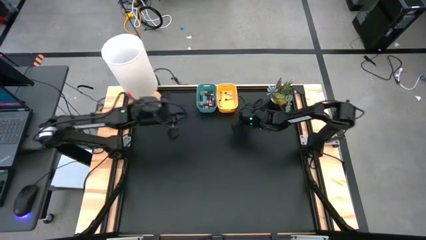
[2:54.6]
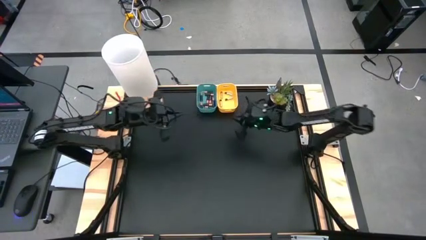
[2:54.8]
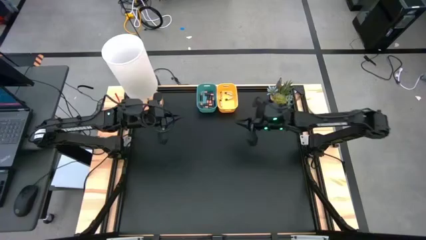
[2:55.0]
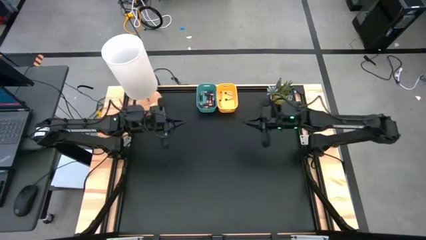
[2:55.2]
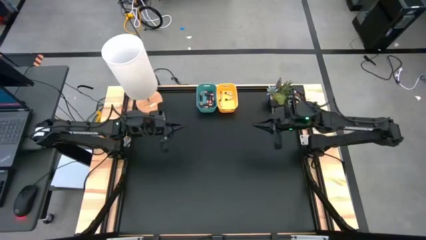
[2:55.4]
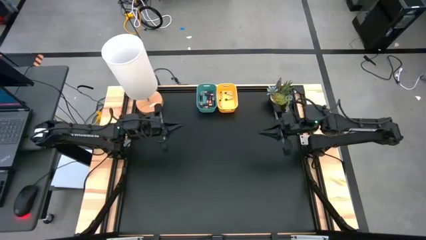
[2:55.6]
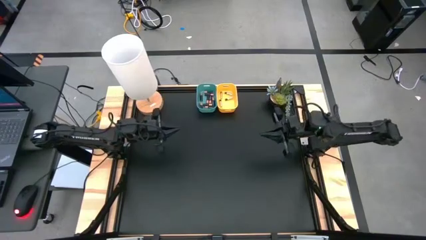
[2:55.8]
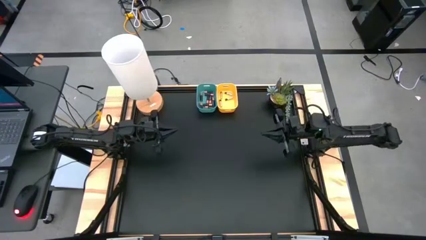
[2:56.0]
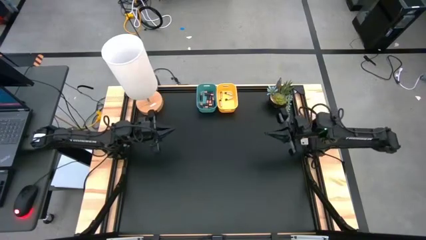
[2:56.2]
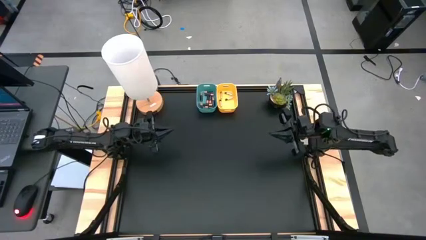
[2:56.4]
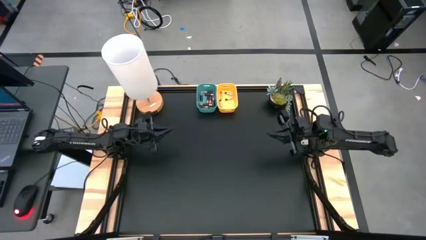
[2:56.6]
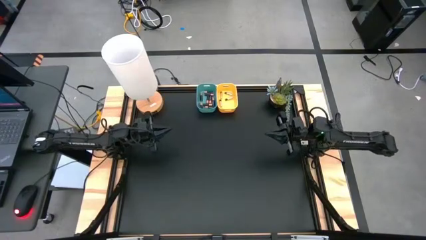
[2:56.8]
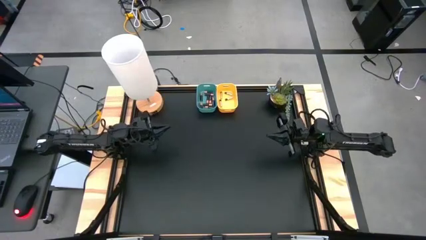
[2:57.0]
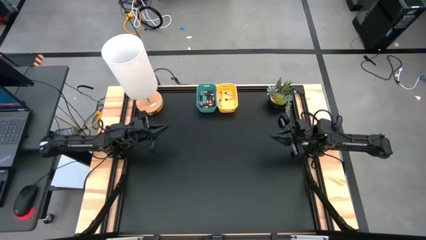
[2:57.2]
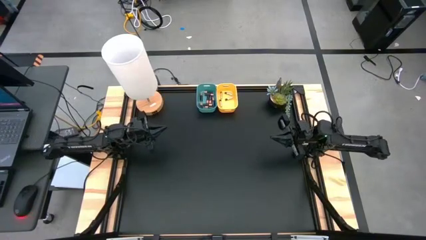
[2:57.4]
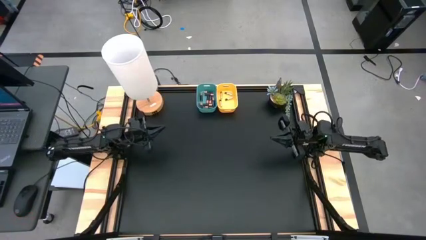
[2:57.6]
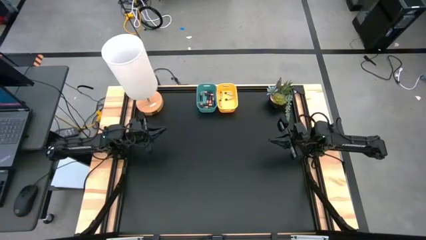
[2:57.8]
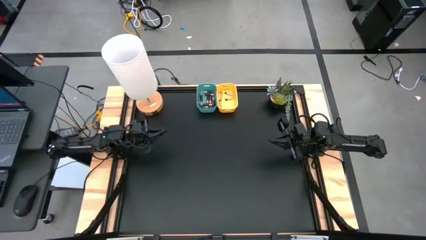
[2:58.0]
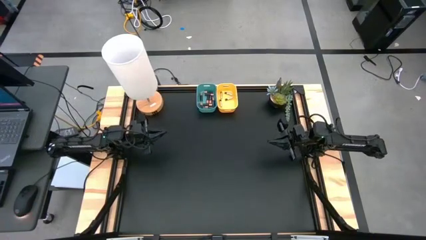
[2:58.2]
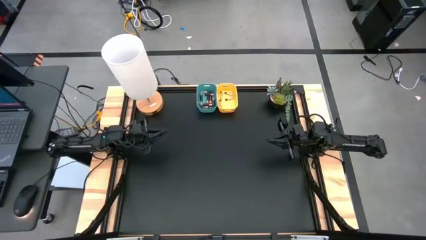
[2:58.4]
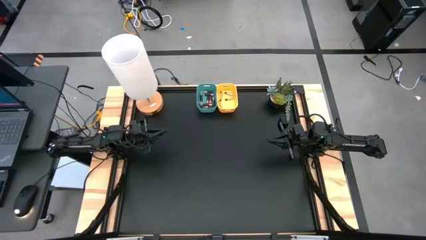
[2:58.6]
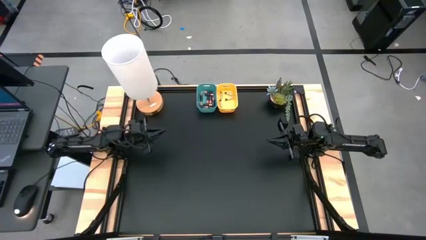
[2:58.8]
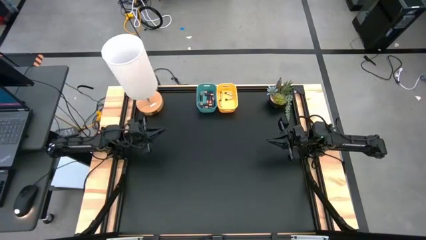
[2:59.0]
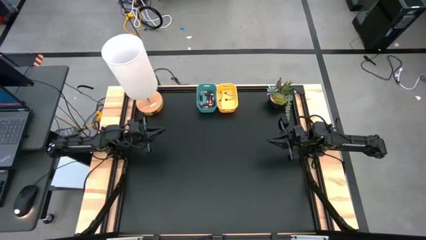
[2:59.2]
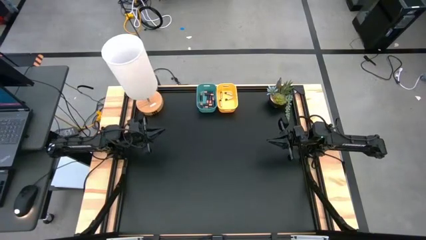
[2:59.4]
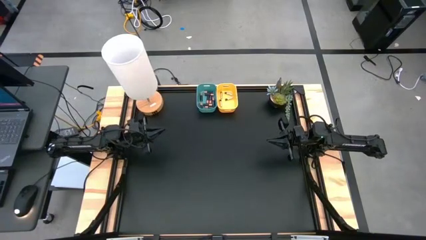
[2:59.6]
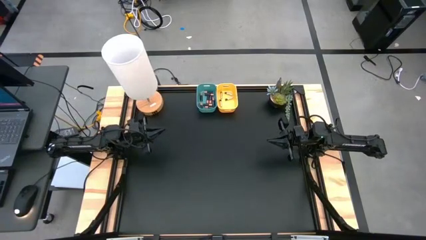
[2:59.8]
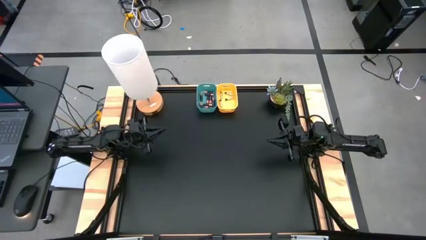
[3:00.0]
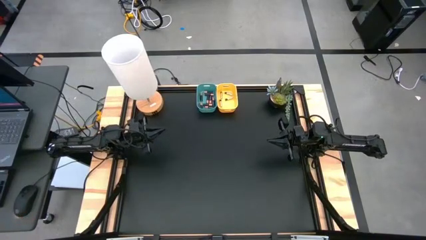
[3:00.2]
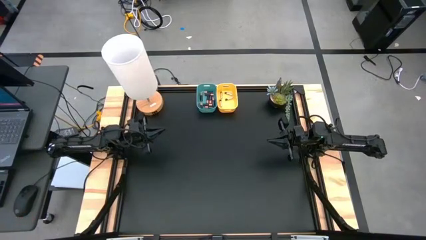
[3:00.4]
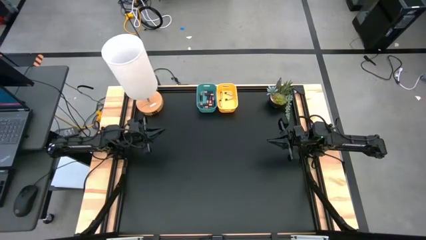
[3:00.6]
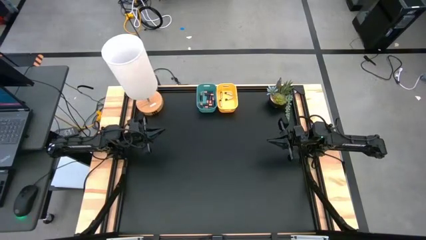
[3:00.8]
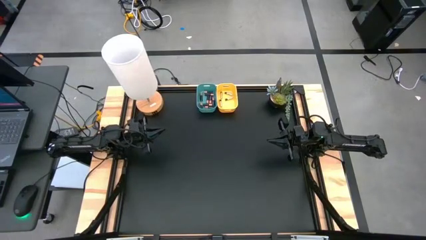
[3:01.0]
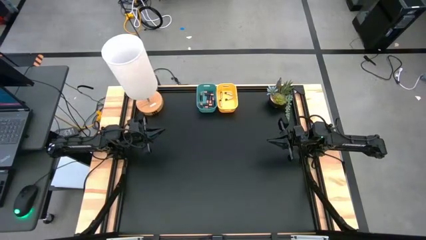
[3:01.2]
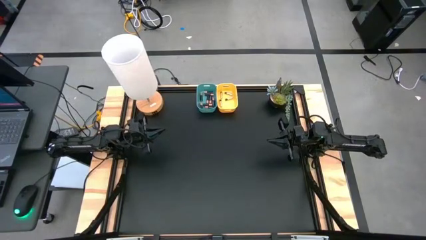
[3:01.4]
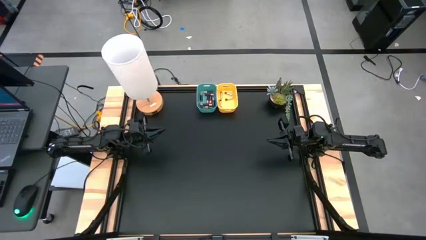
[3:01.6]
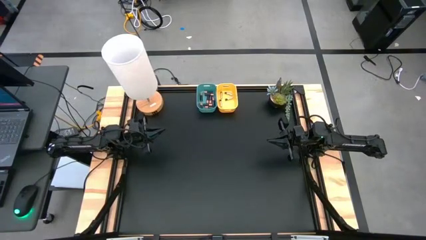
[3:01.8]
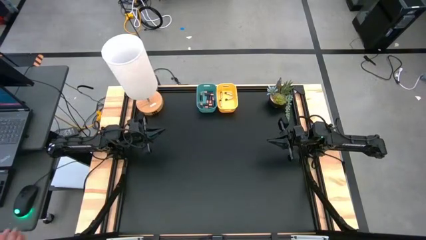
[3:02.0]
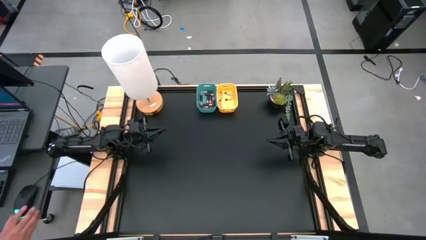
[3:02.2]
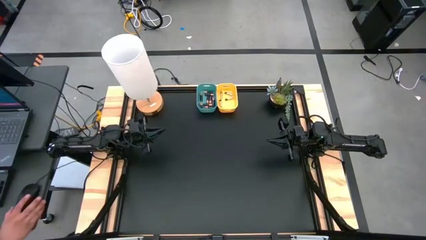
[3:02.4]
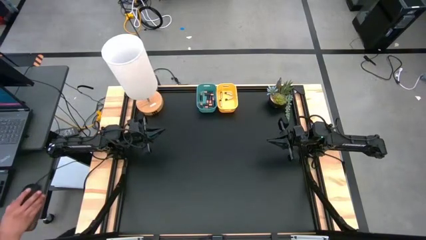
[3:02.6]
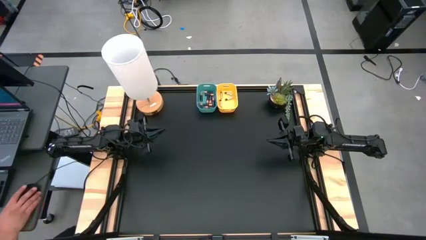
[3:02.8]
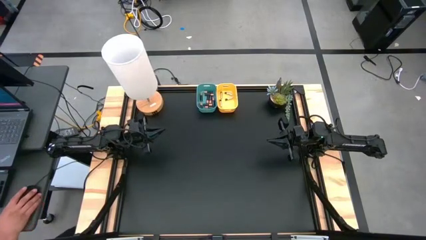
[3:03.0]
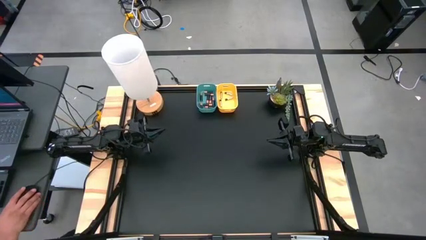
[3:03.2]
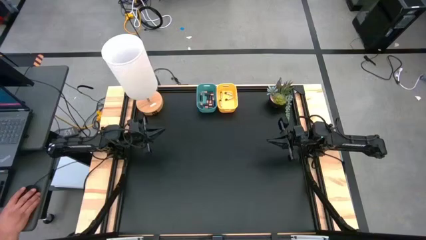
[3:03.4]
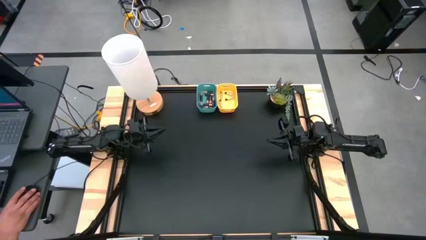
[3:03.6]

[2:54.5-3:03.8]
Task: Sort batteries
Return to Home Position

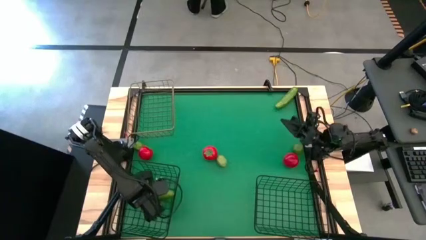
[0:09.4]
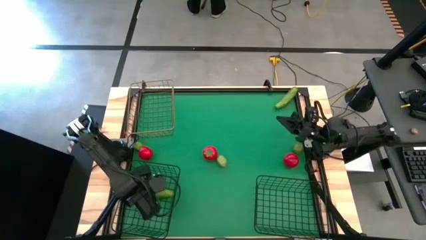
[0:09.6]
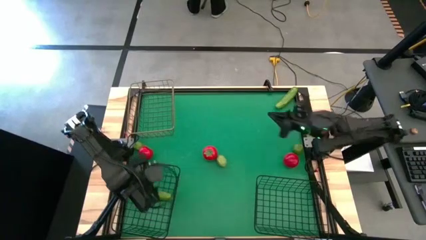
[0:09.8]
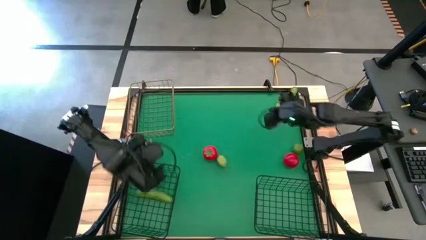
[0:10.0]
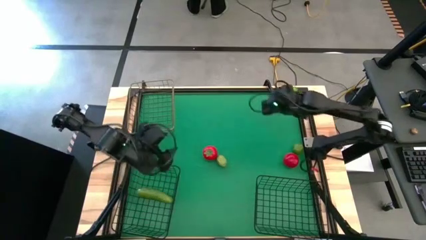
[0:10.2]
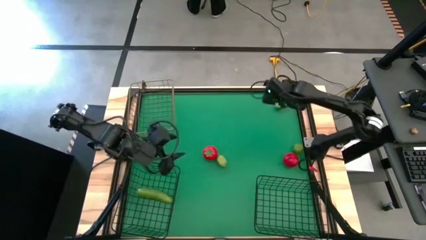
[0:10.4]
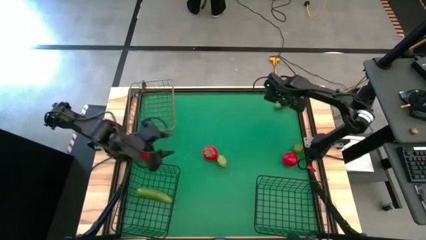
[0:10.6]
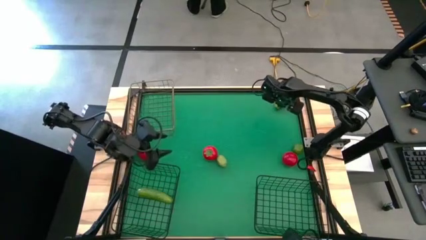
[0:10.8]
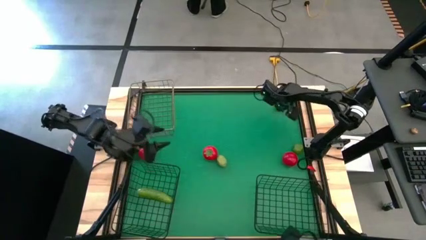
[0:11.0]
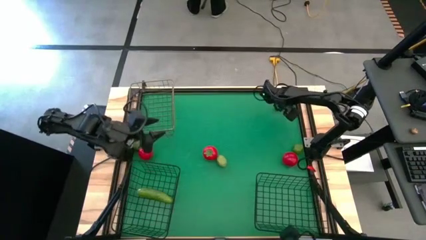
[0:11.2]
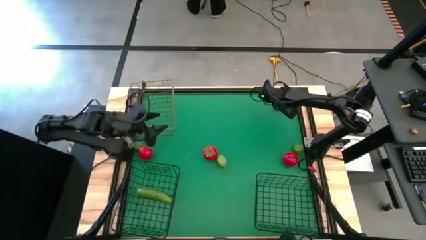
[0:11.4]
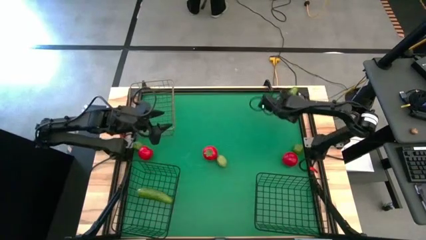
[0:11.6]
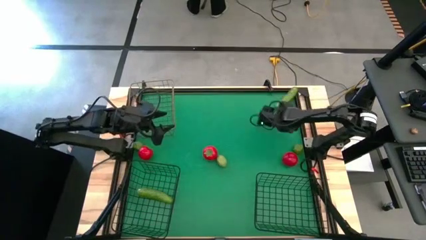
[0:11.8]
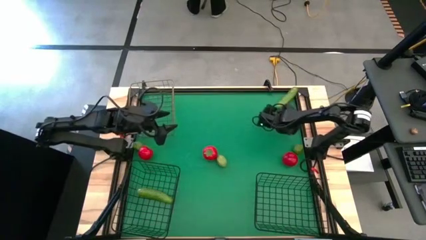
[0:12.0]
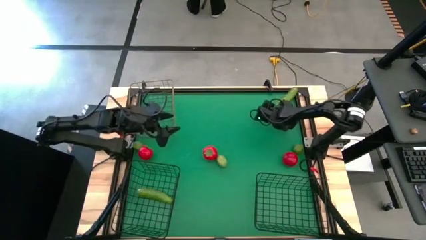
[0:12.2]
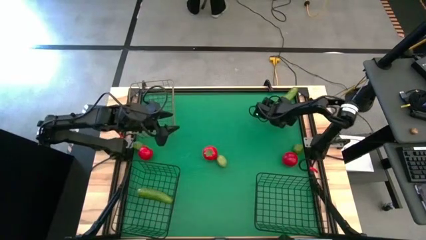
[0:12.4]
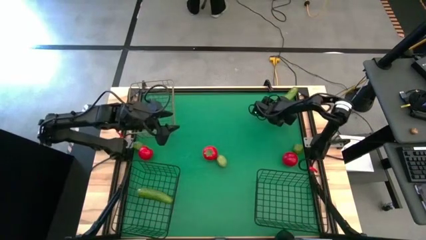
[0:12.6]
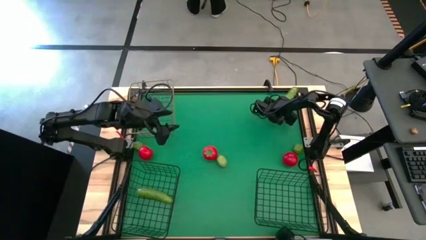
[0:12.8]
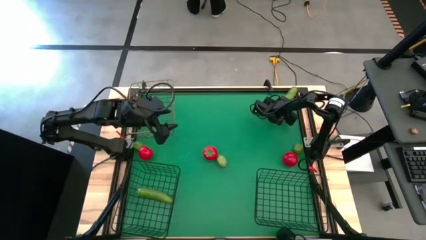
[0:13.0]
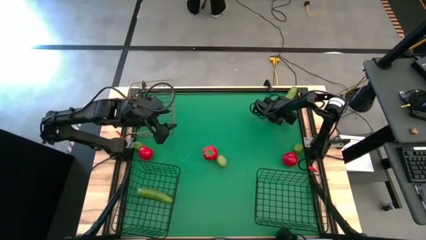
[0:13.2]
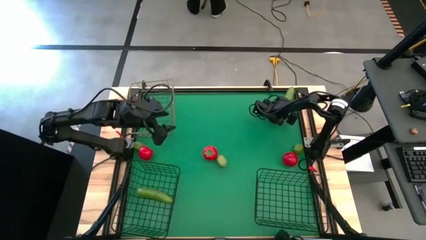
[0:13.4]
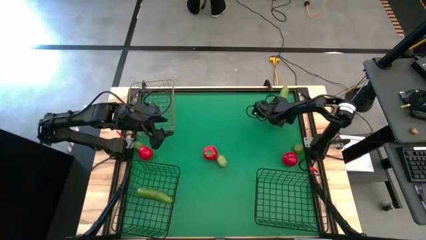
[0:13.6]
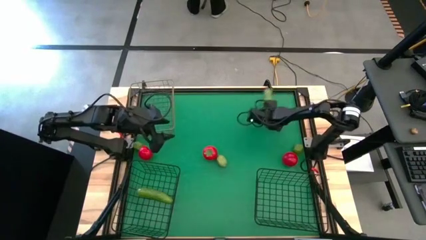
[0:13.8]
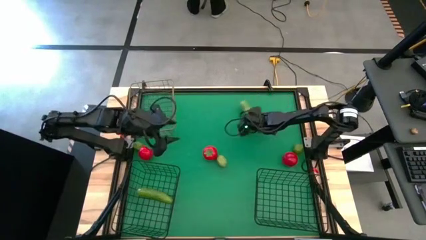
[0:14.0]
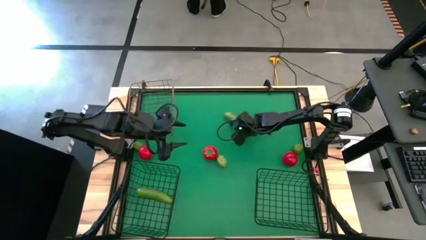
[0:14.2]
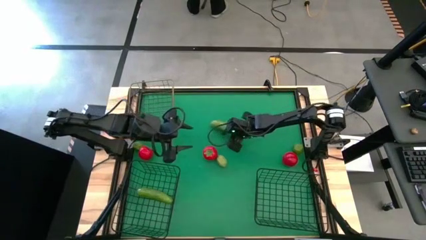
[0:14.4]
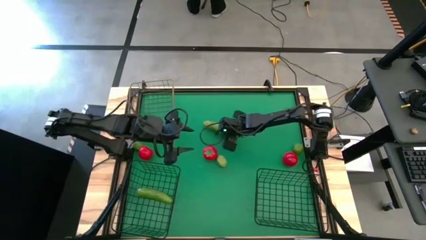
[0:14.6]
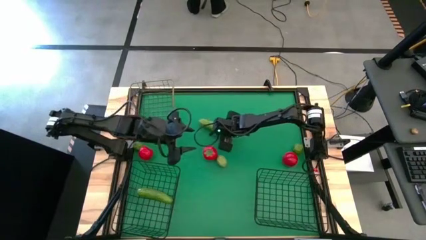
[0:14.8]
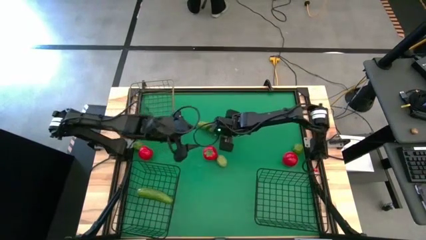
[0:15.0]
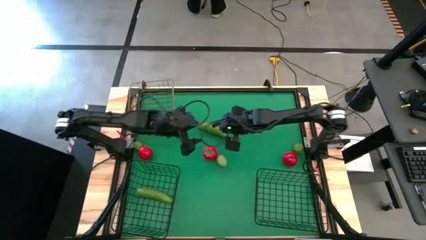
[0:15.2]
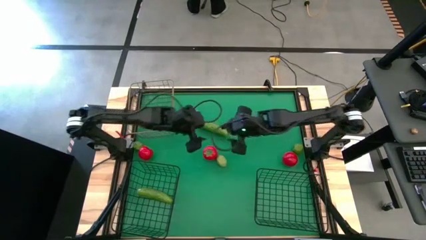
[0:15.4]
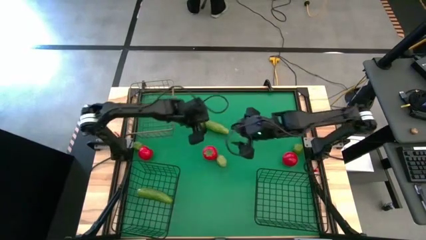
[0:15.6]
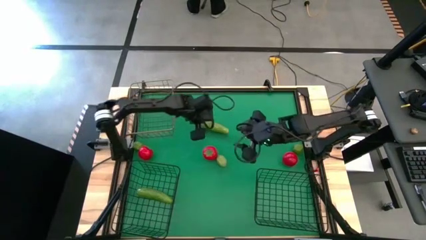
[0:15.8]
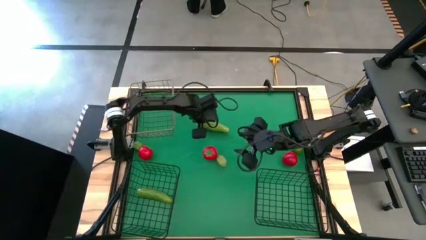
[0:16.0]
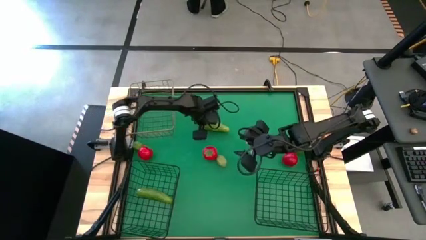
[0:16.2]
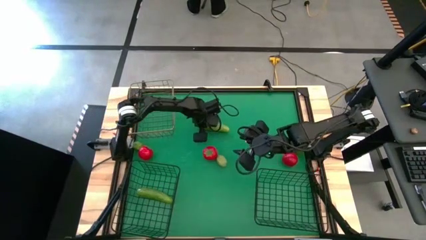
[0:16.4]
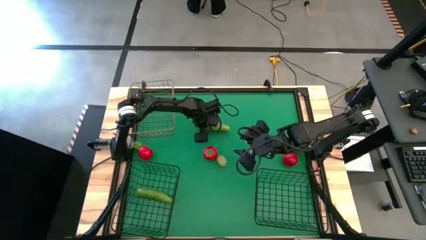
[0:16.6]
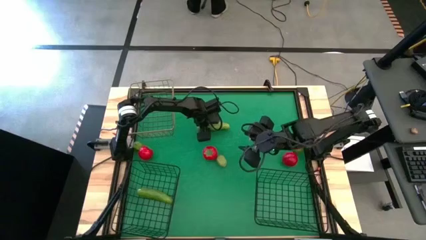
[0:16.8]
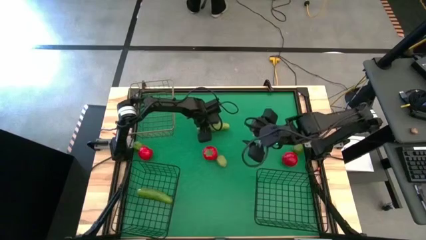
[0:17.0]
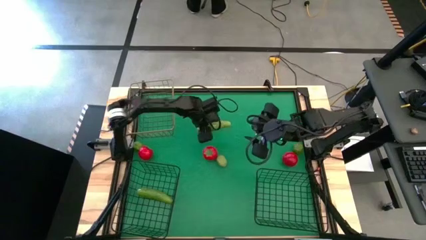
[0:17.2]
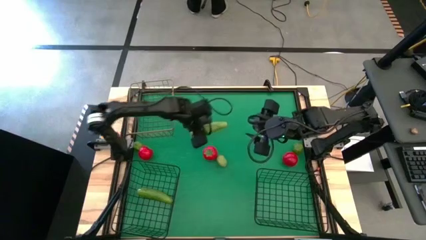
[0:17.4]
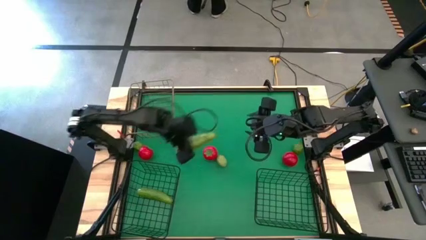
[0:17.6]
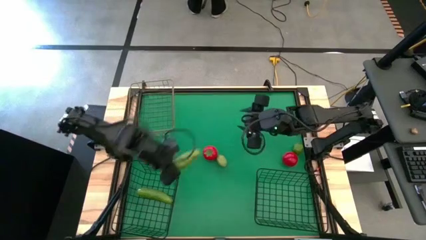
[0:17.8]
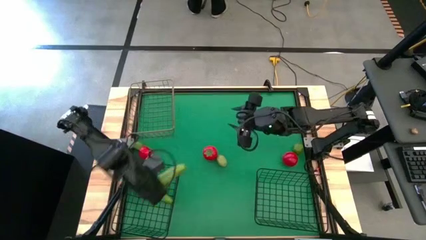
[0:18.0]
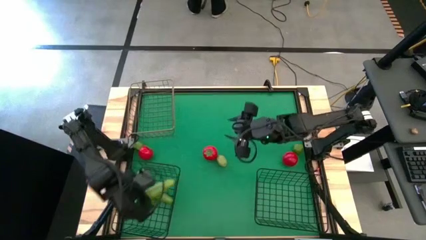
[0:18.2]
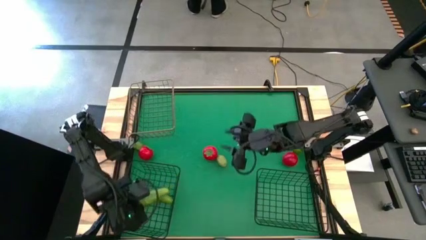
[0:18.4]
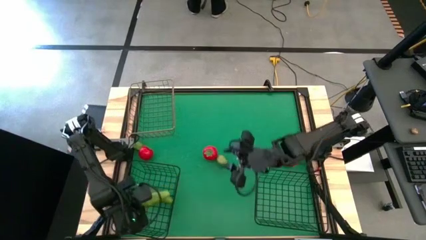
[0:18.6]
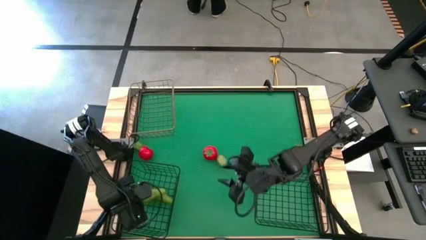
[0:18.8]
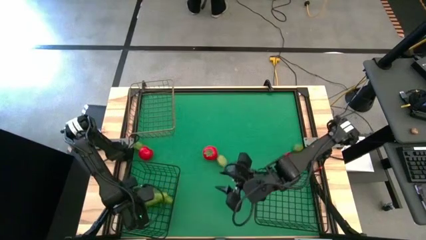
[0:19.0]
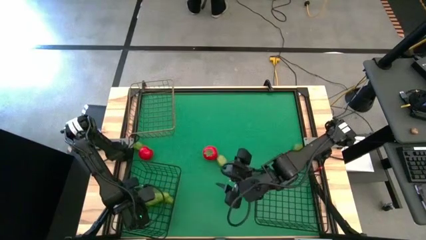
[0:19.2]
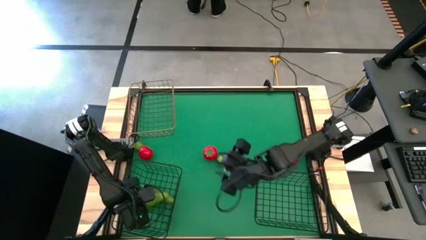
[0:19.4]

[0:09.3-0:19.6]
Task: Sort produce into baskets
Put the cucumber into the bottom left wire basket
